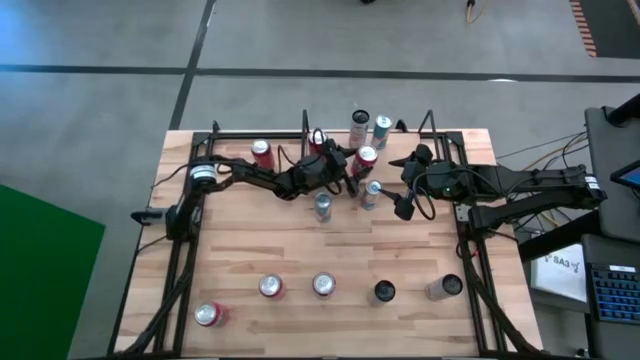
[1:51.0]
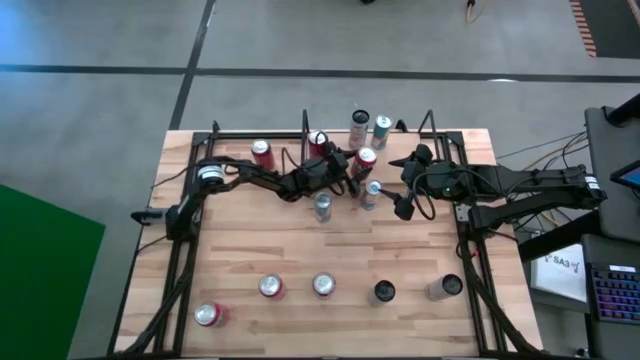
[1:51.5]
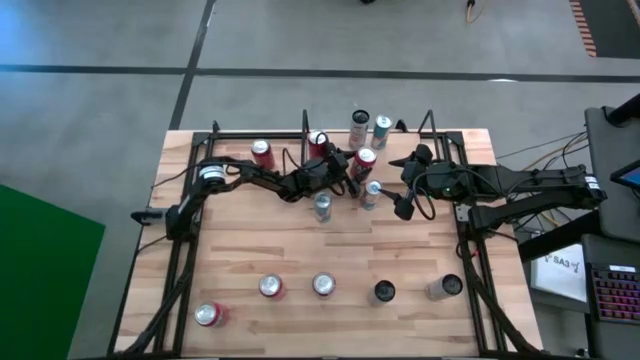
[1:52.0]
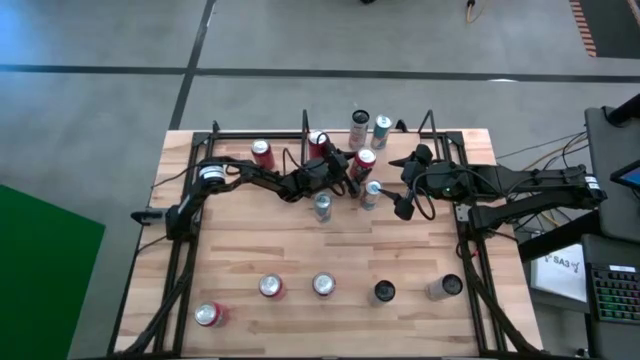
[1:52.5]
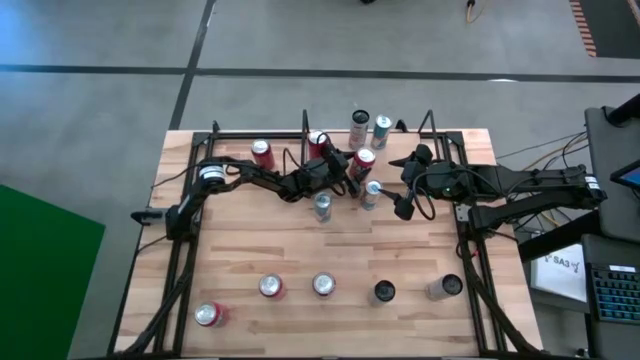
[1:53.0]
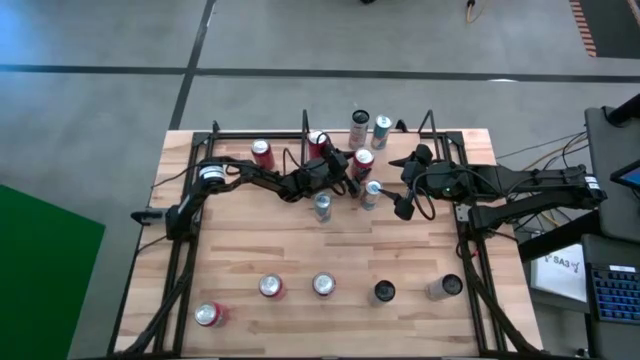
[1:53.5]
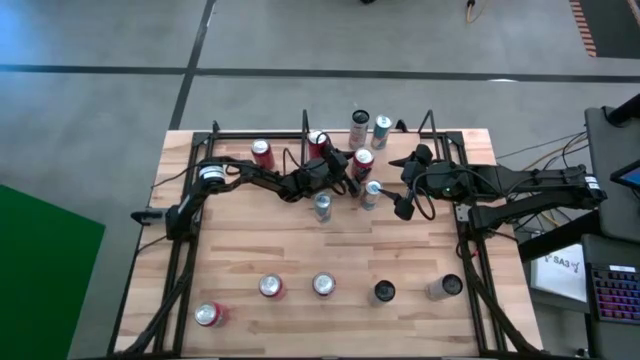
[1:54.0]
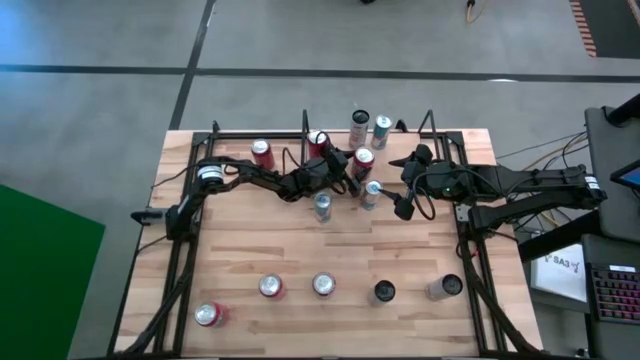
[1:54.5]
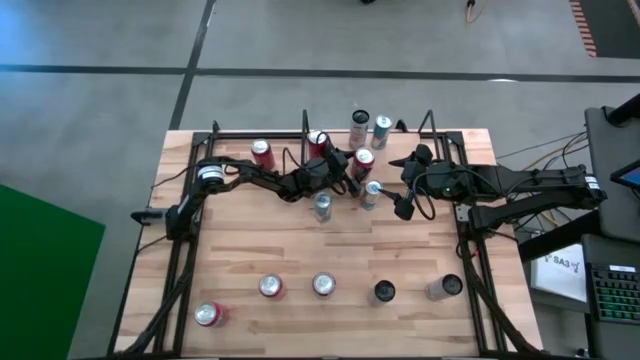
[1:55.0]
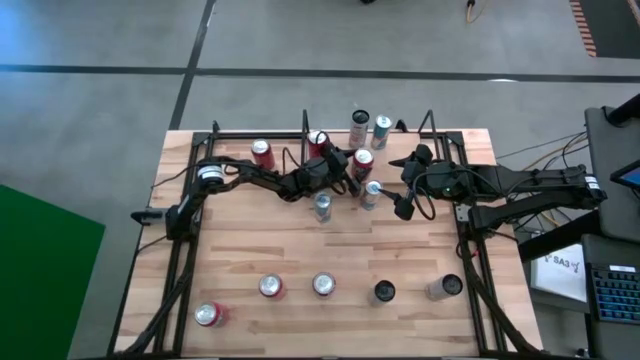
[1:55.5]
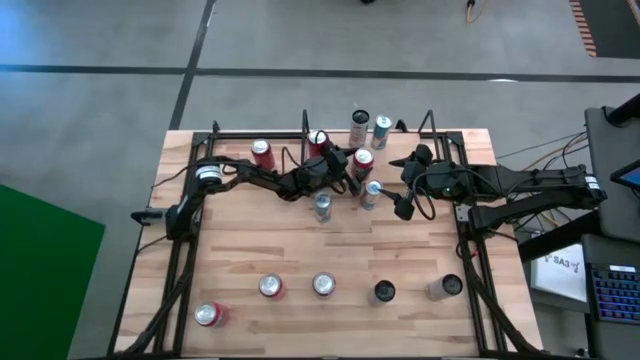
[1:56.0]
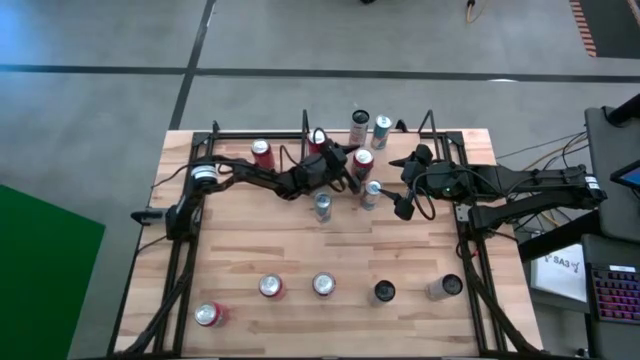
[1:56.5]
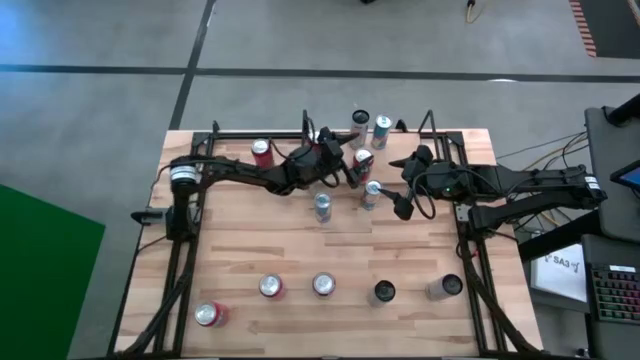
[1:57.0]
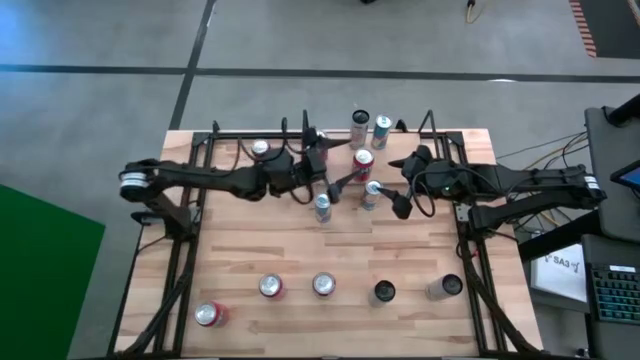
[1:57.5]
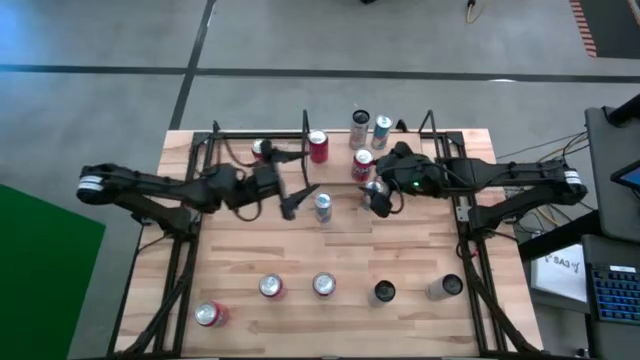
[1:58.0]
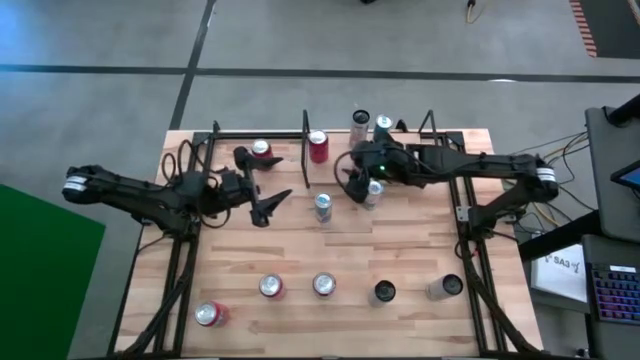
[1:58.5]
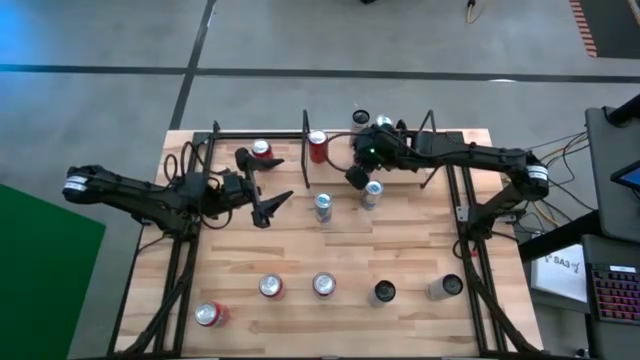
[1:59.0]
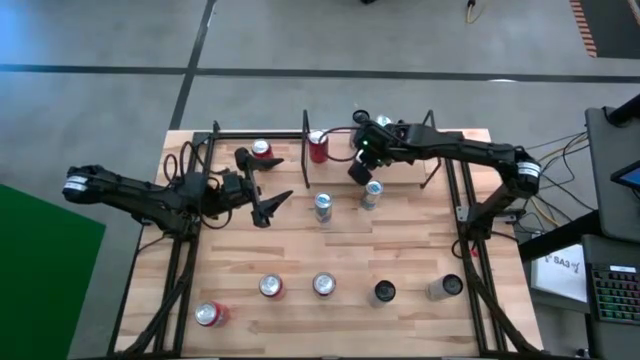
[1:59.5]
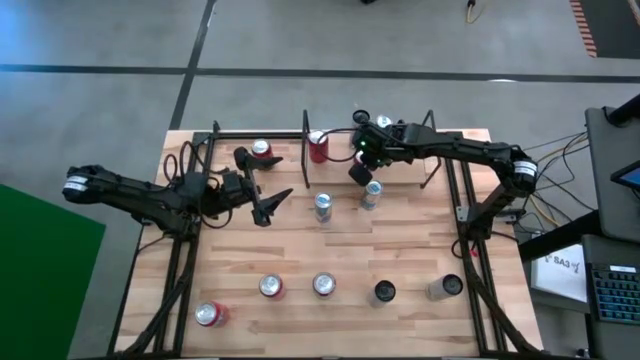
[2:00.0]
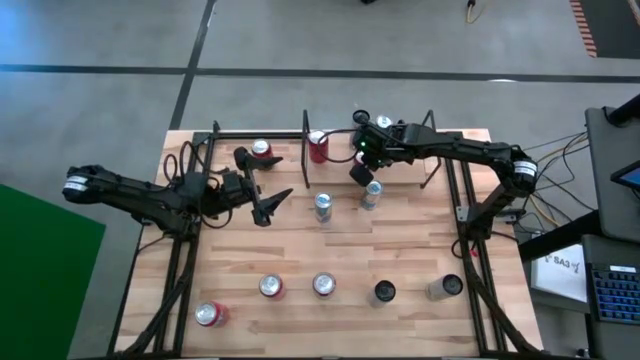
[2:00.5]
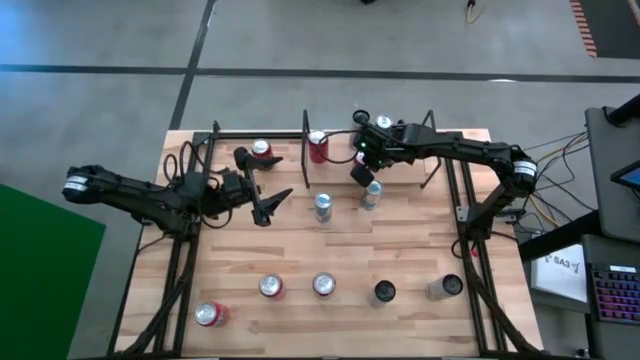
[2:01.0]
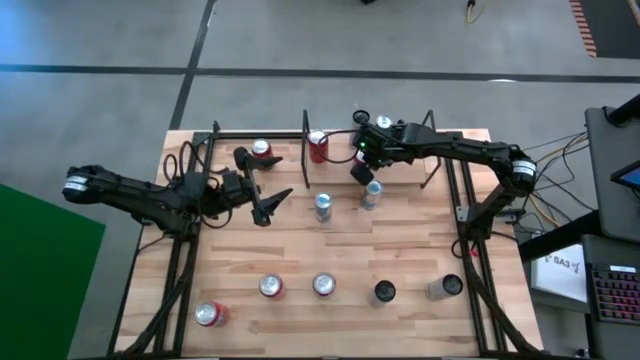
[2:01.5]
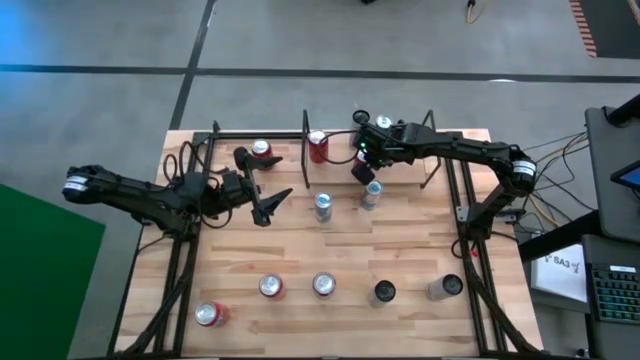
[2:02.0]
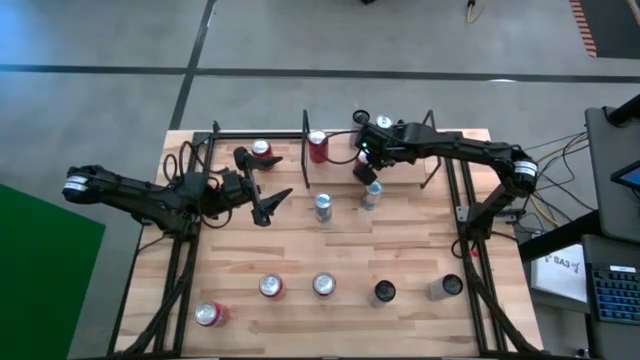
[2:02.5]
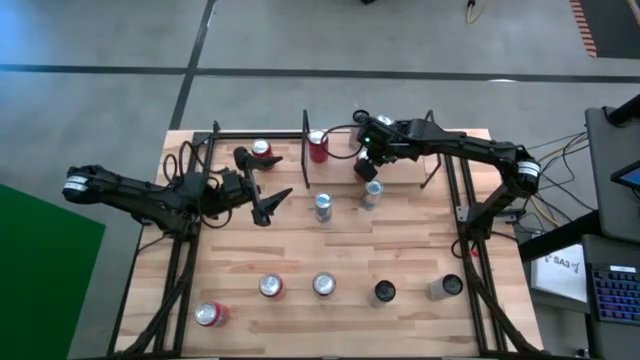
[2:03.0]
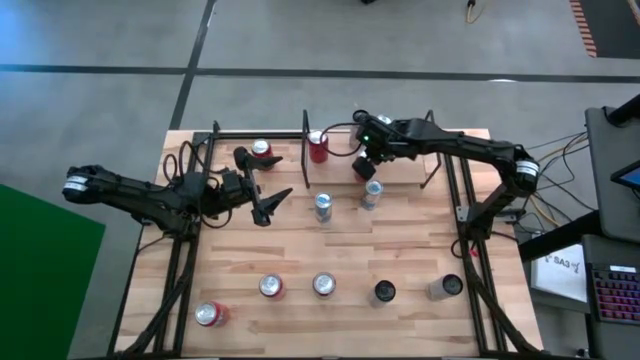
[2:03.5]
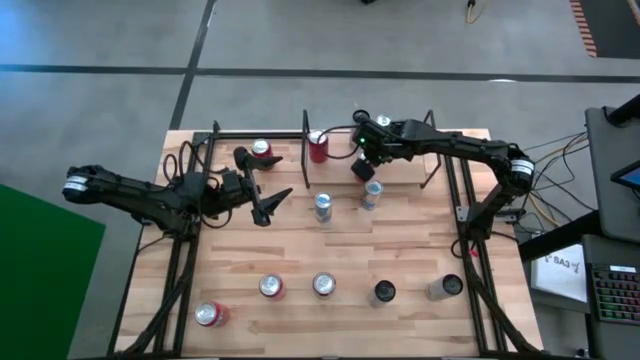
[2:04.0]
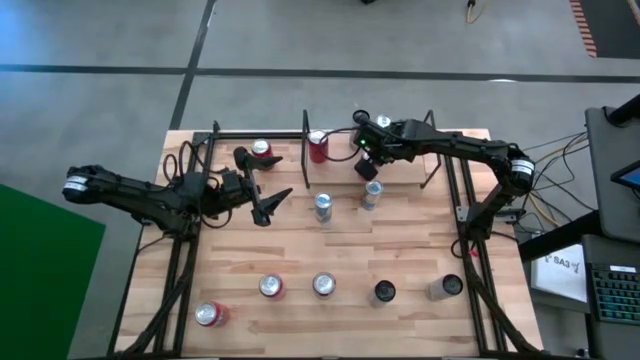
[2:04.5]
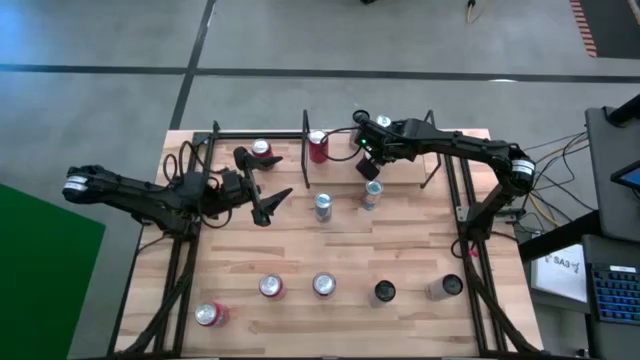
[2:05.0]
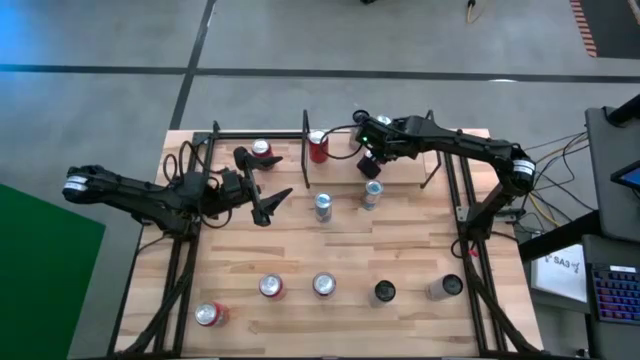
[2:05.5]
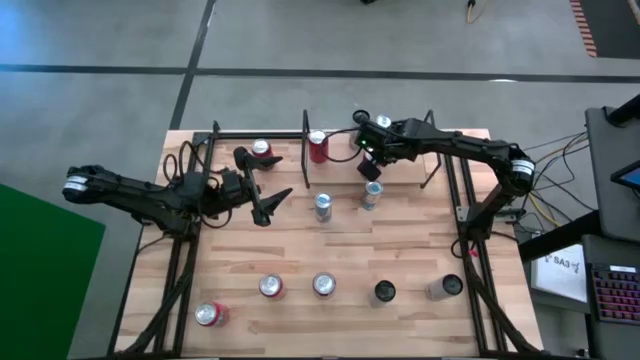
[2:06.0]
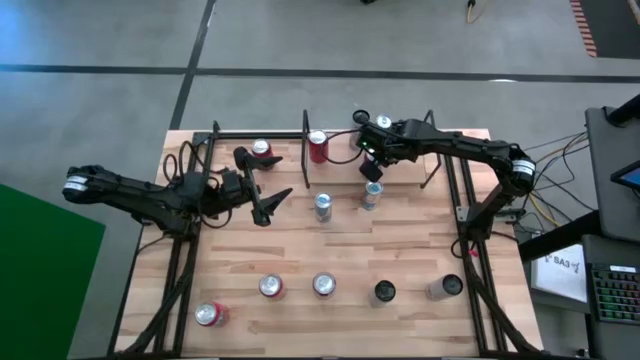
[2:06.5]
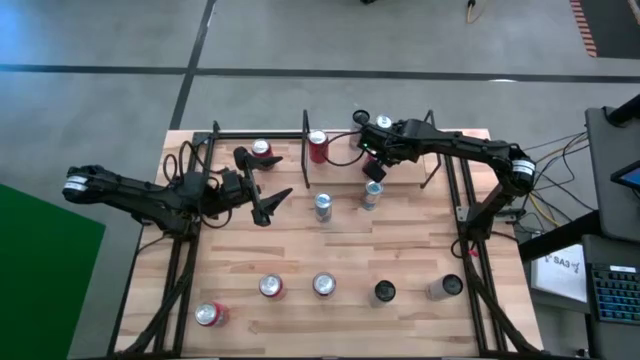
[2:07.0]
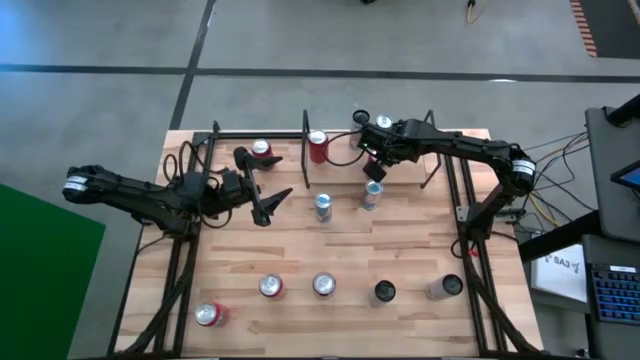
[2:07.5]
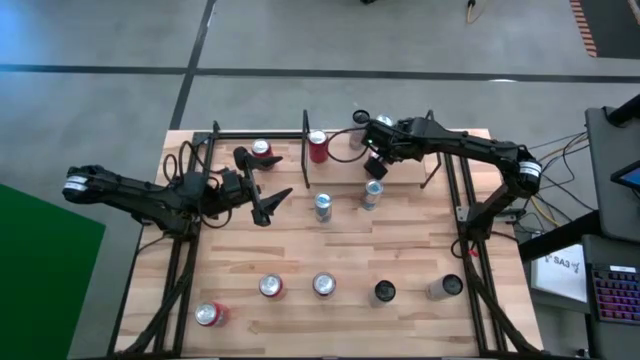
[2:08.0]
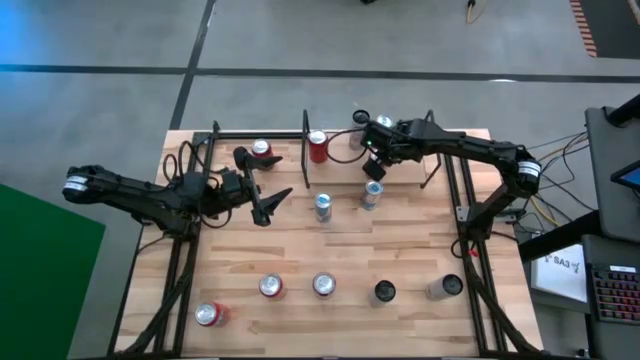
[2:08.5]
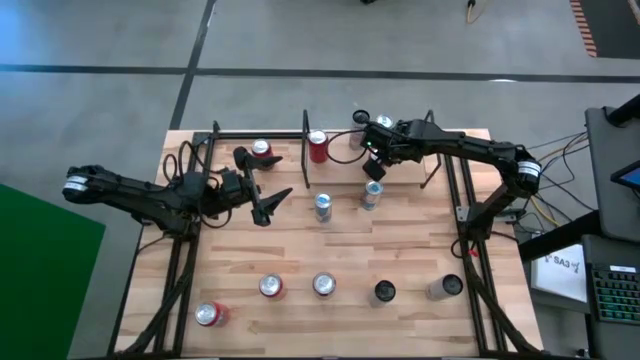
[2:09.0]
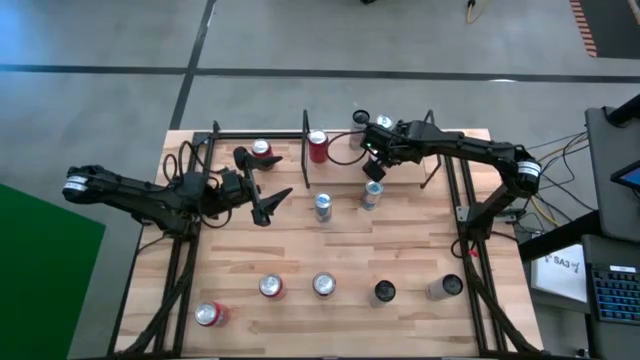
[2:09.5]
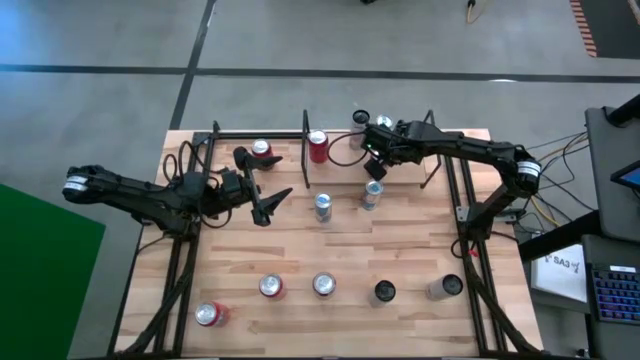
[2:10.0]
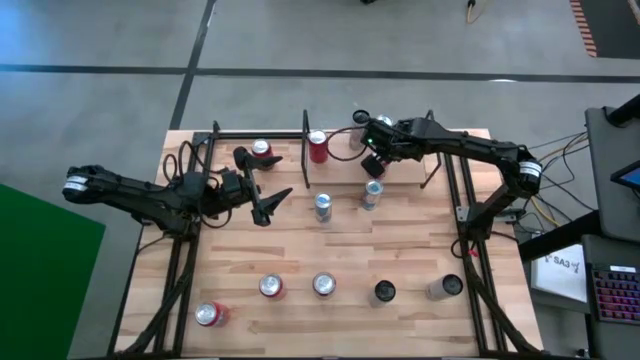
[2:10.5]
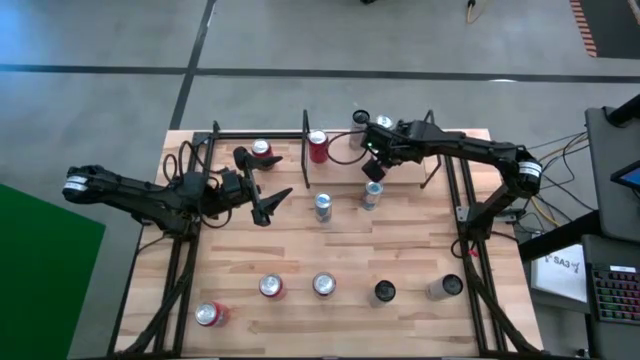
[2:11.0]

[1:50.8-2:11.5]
Task: Place canned beverage on shelf
Put the red soda can on the shelf

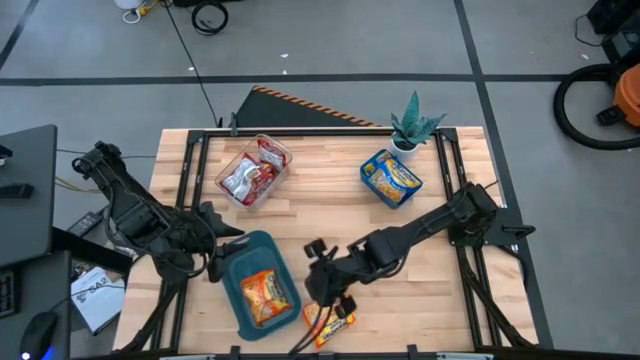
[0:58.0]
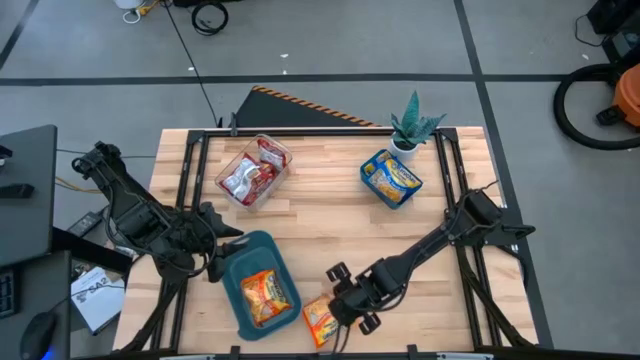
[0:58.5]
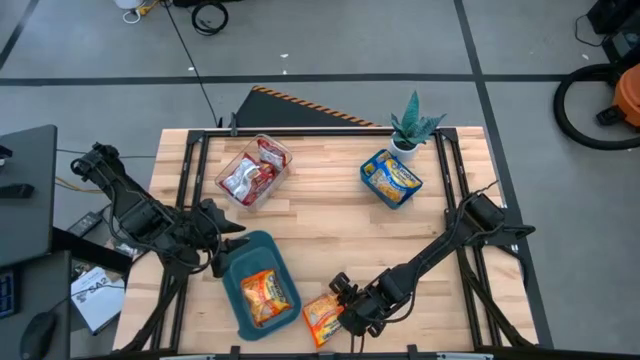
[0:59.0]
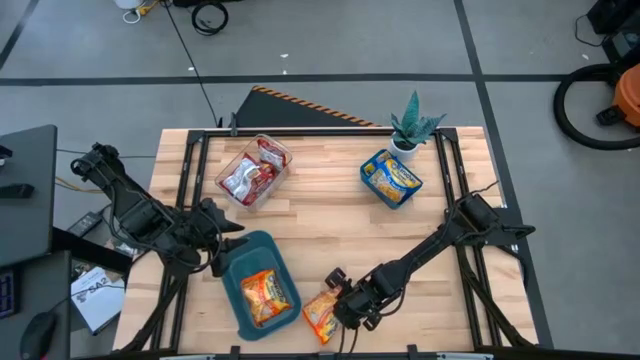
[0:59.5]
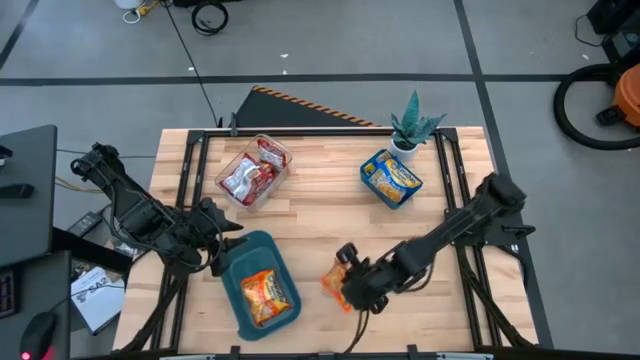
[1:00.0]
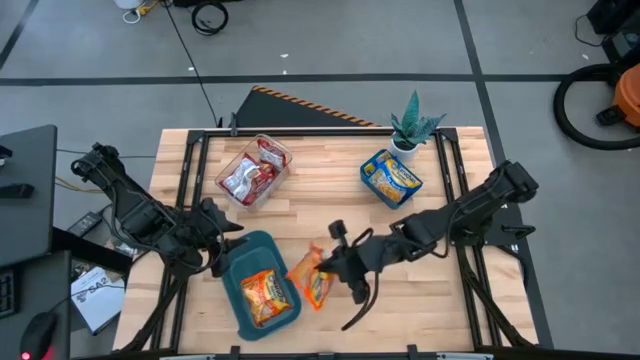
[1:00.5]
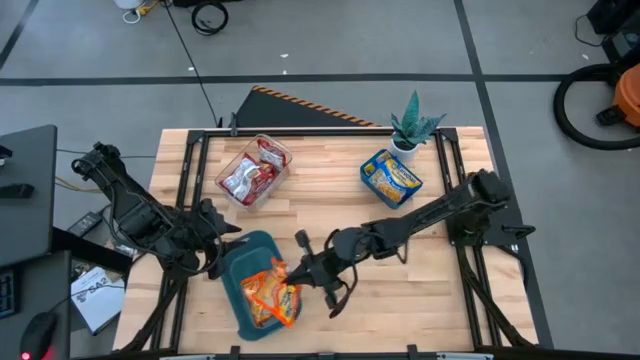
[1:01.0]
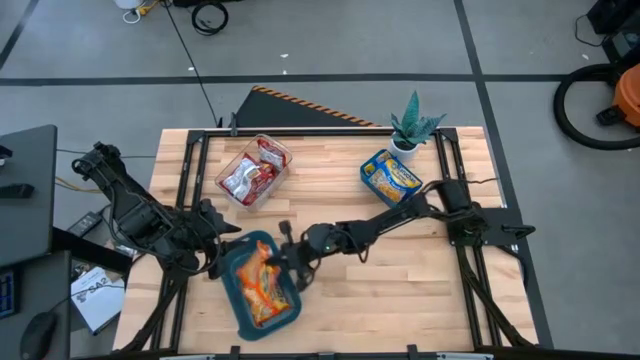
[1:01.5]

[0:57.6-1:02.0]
Task: Sort Maruchan noodles
Put the orange noodle pack into the dark blue bin
